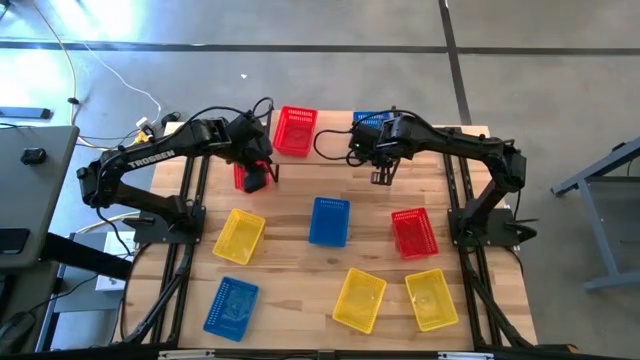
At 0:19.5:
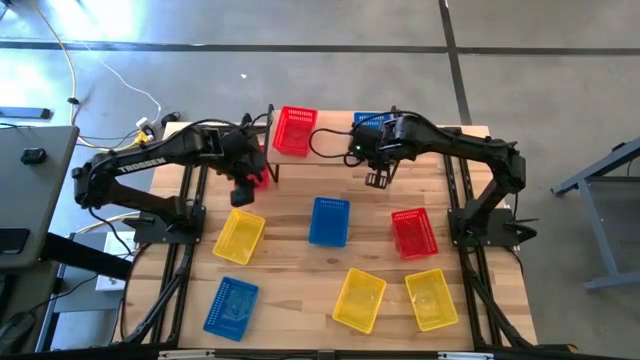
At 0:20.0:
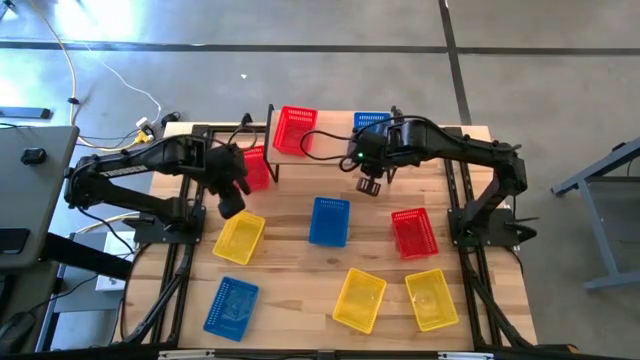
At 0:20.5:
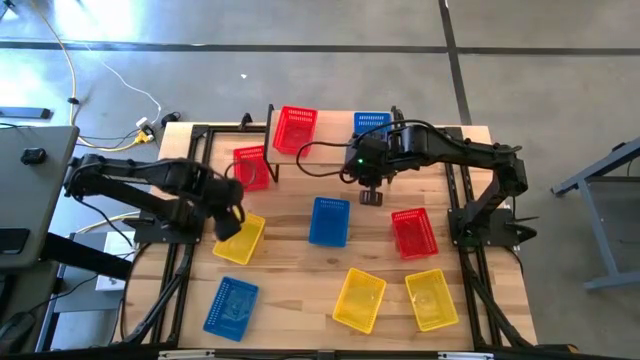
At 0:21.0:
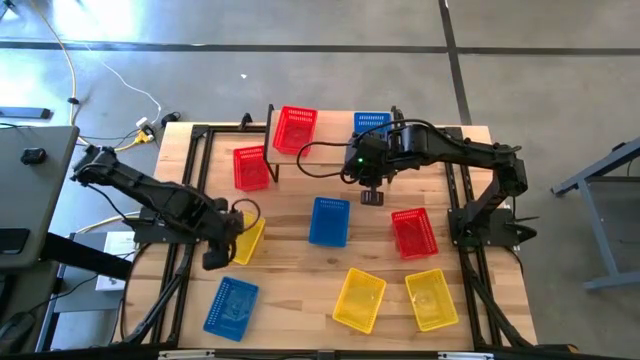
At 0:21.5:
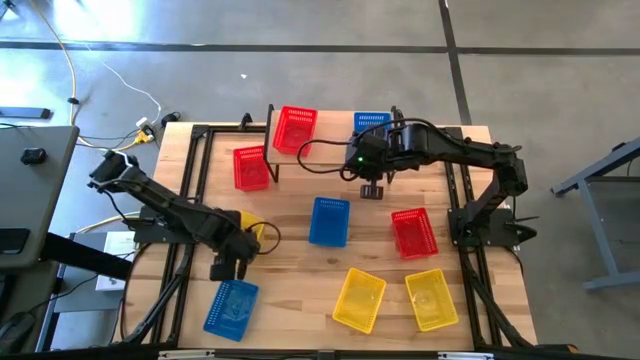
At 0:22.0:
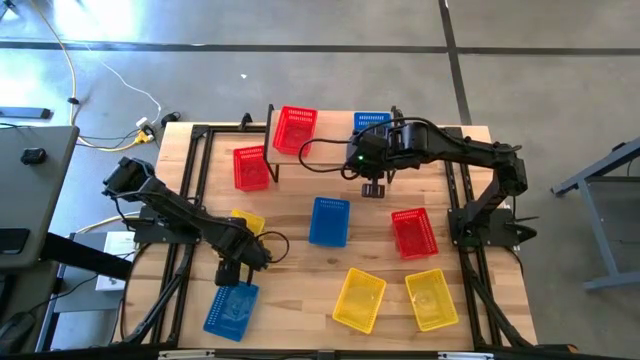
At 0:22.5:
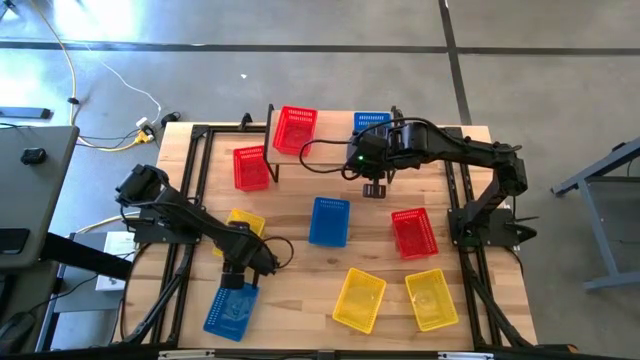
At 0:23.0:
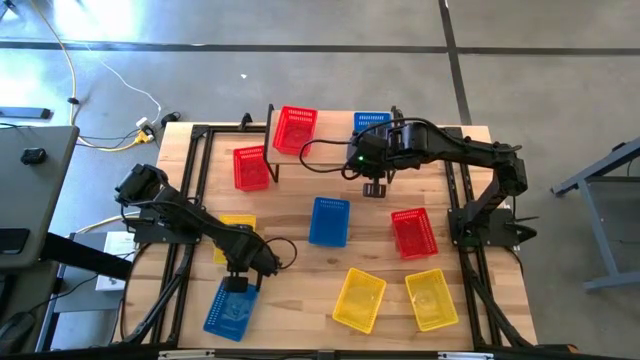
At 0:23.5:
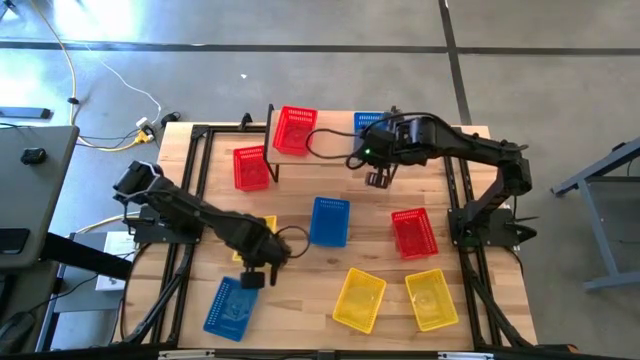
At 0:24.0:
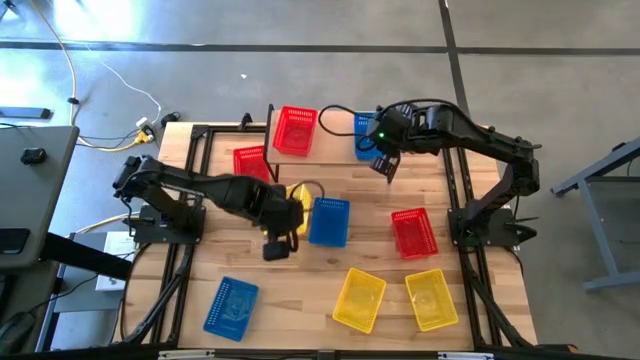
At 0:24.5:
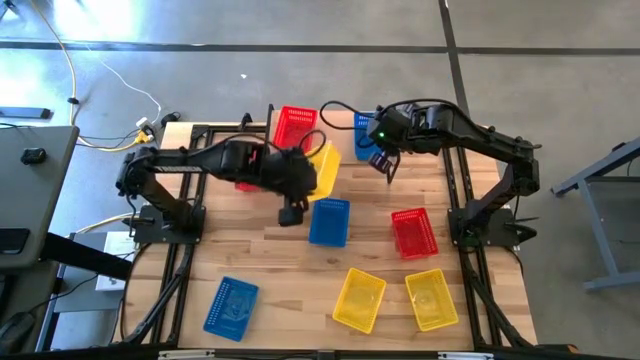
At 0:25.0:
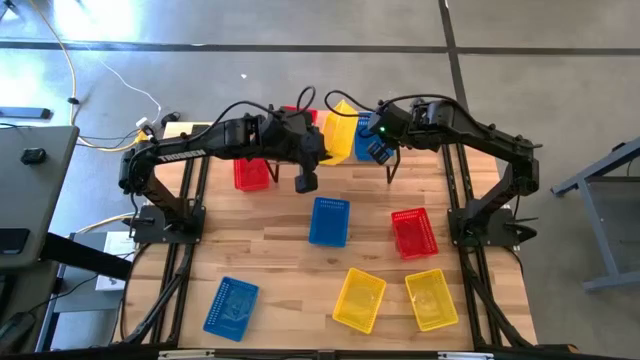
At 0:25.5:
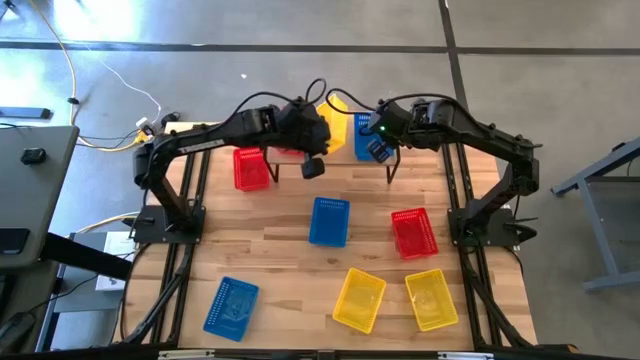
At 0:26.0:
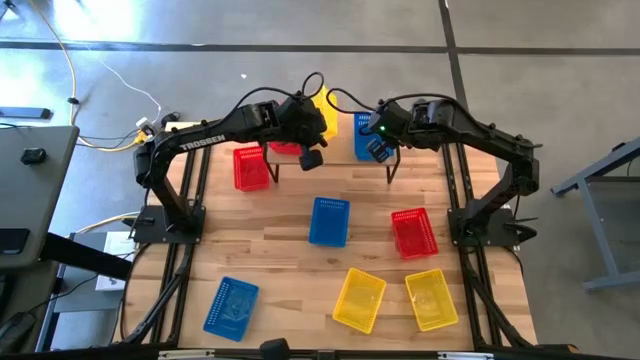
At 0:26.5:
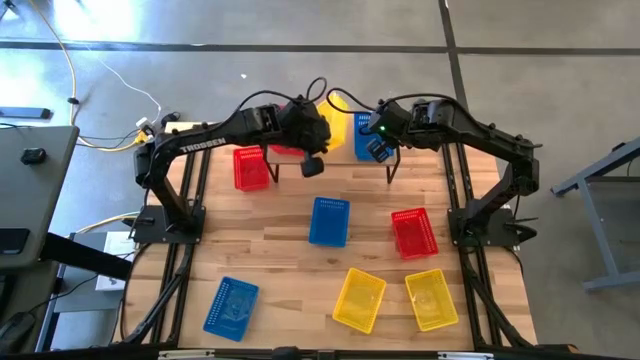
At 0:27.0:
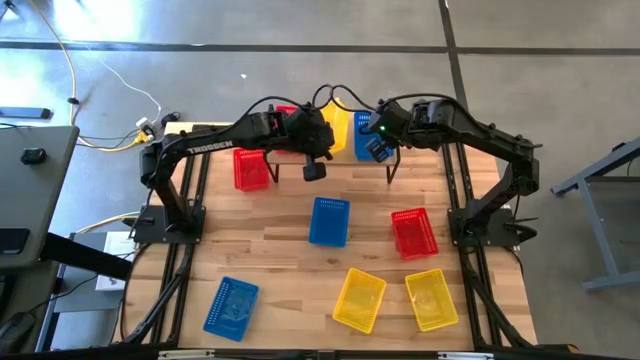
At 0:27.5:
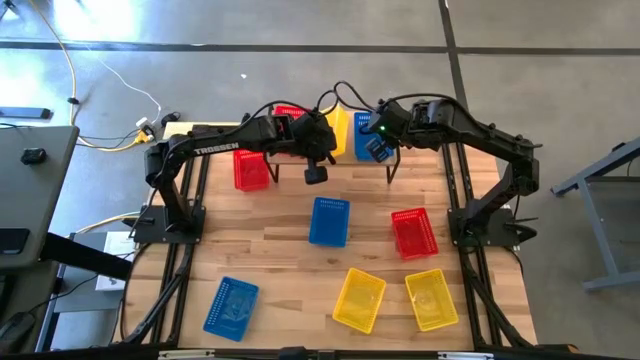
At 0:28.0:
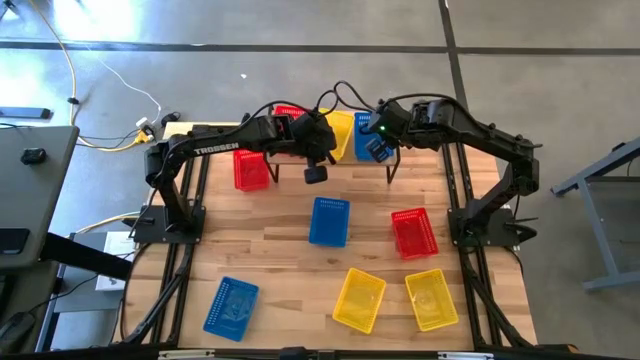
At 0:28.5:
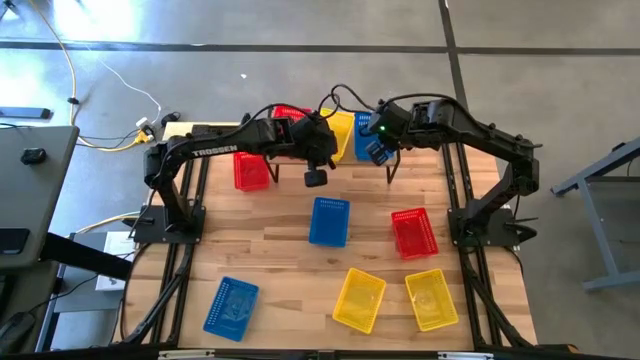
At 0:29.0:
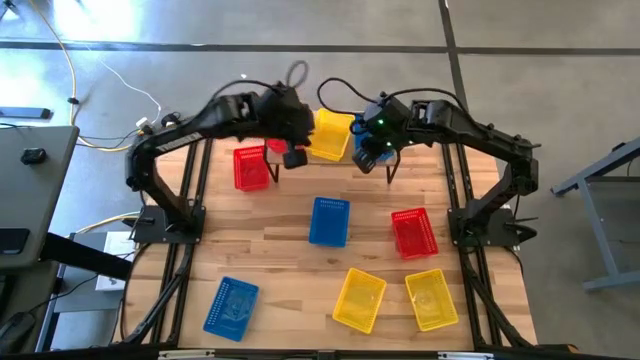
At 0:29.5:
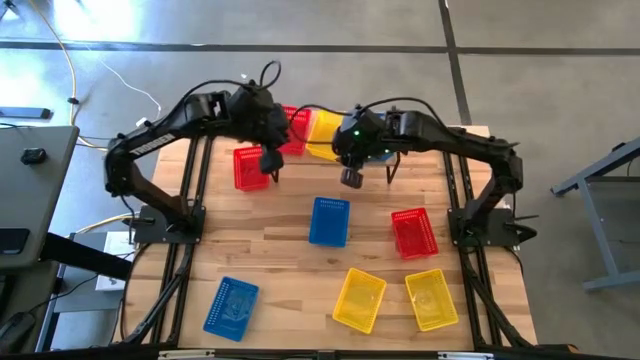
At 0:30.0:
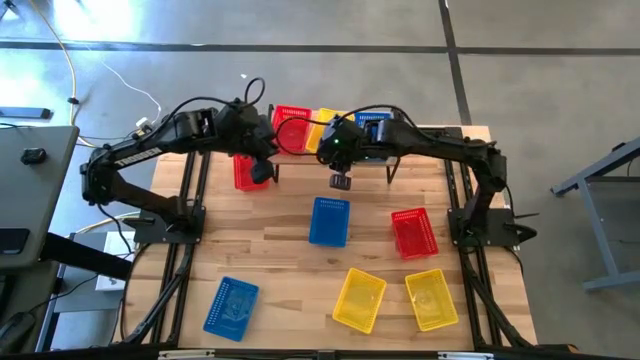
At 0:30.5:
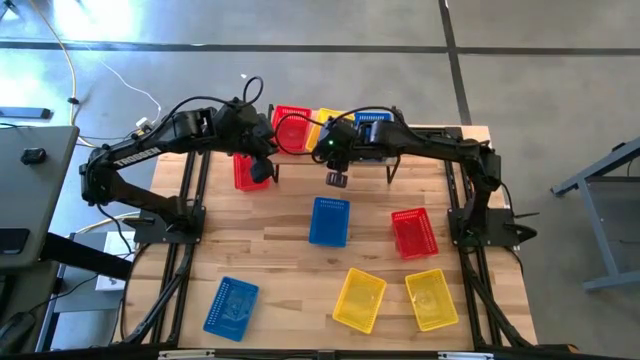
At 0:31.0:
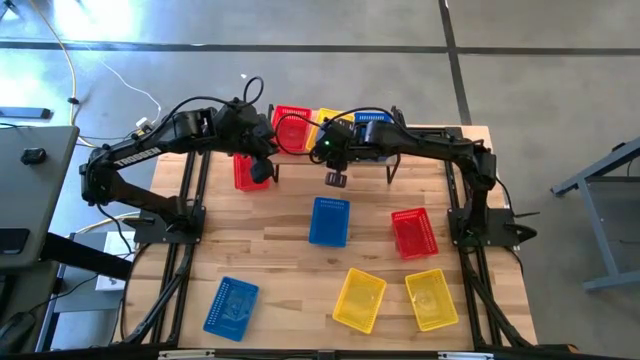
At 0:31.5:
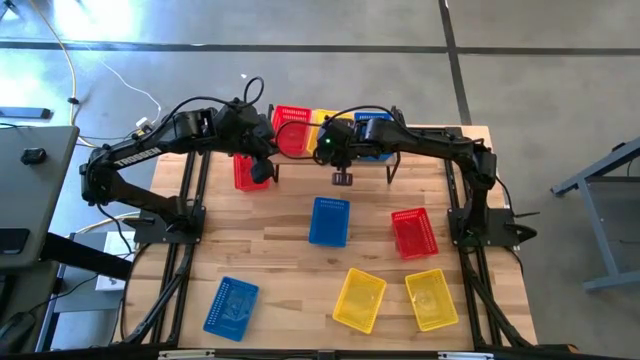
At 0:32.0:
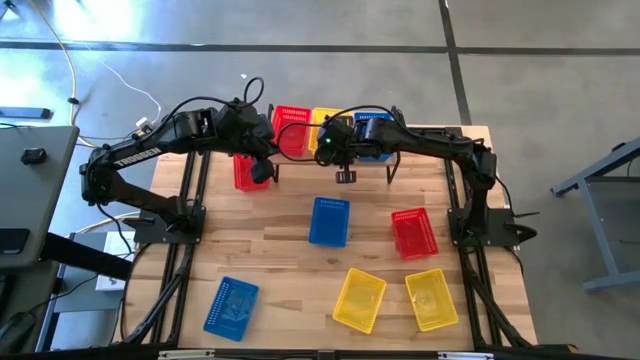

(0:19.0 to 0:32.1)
Task: Stack baskets on shelf by color
Put the top yellow bin on the shelf

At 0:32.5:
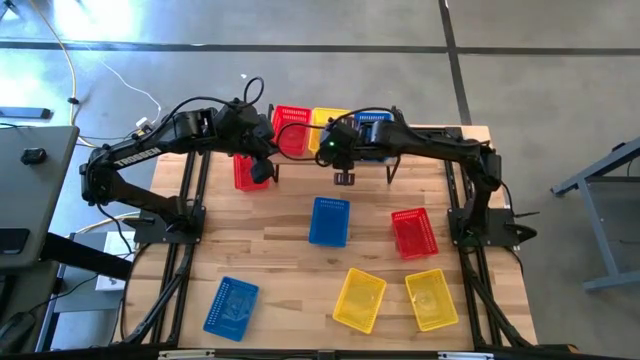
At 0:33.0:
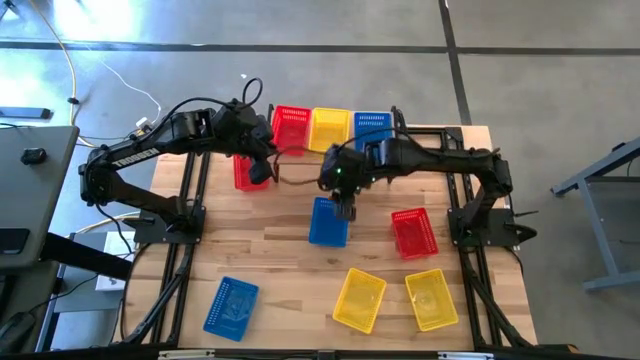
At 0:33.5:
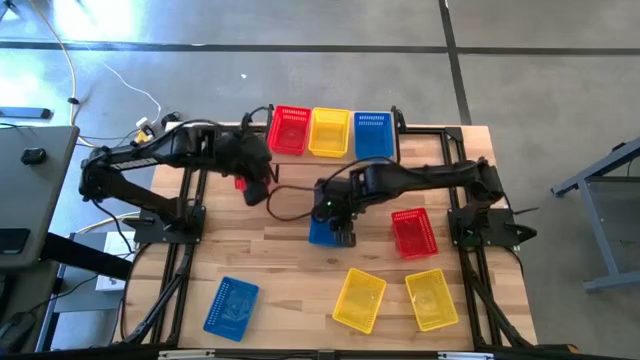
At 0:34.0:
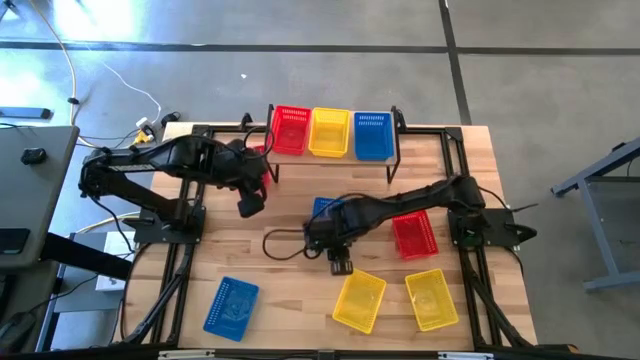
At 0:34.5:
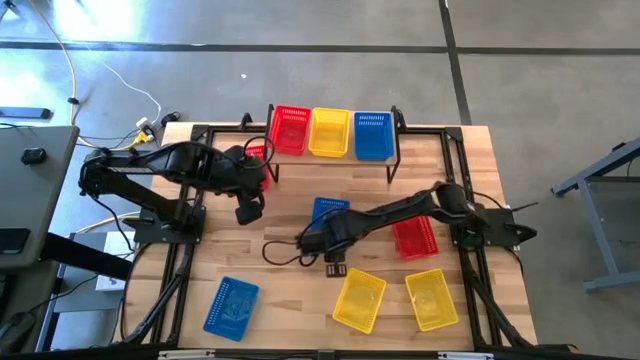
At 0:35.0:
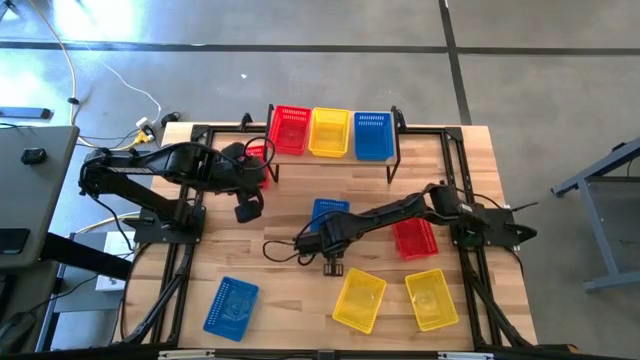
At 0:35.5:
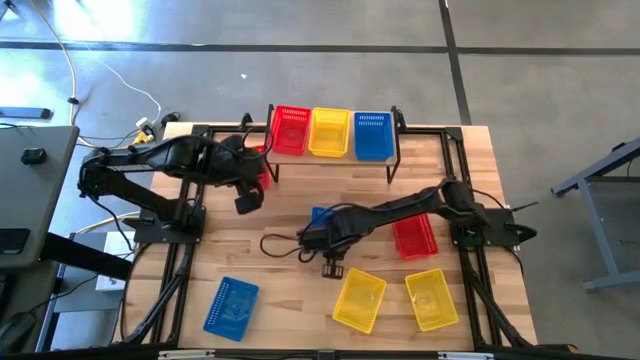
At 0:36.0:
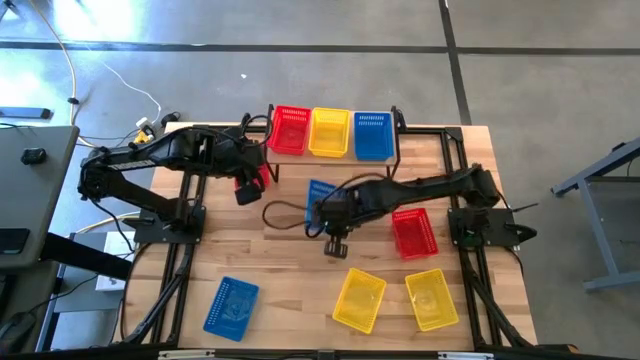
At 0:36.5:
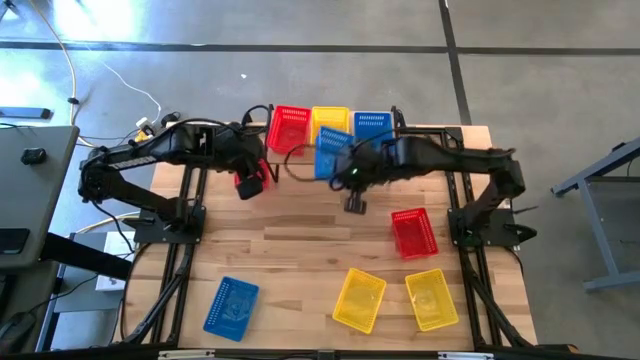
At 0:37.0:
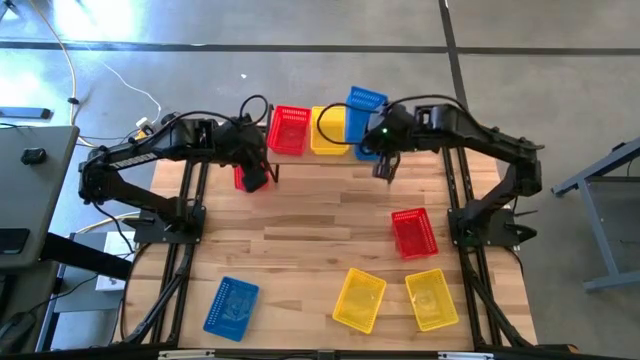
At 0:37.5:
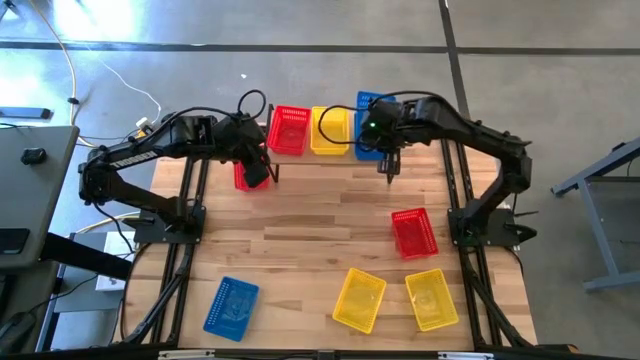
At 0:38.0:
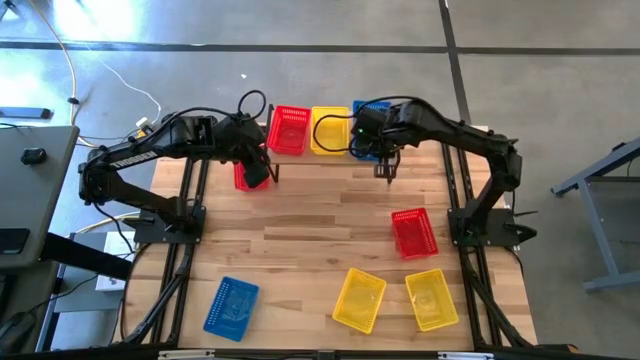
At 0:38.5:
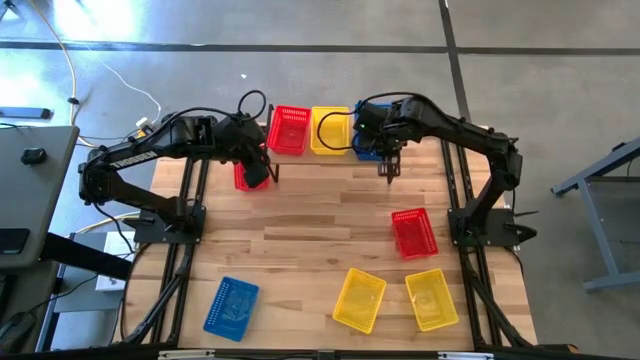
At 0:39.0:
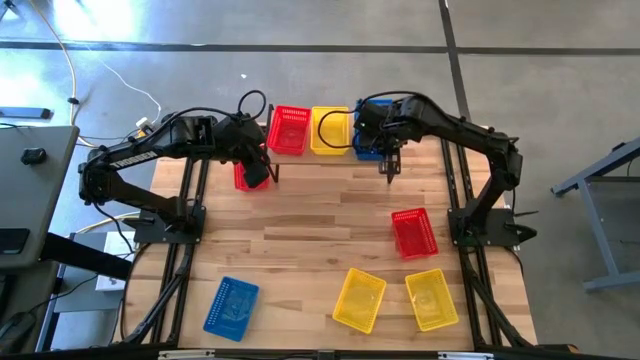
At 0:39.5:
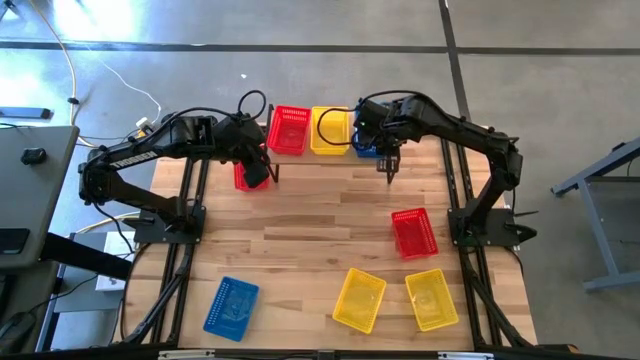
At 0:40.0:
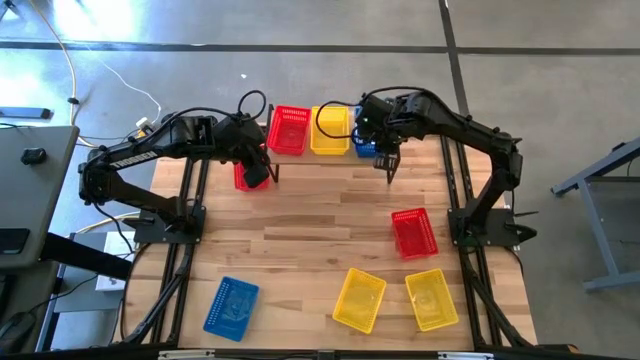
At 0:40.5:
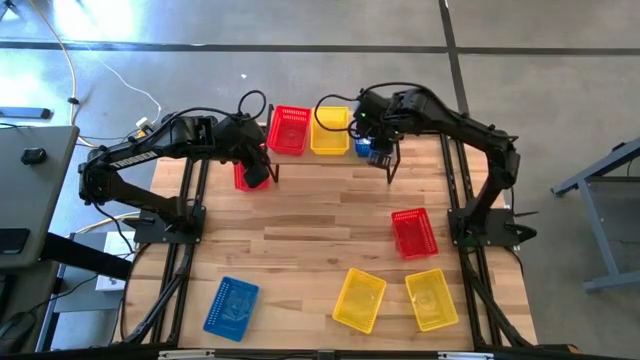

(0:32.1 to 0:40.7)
Stack the top blue bin on the blue bin on the shelf
